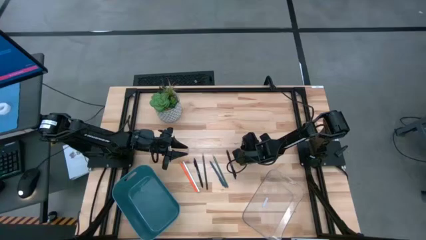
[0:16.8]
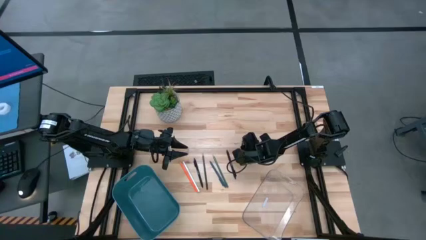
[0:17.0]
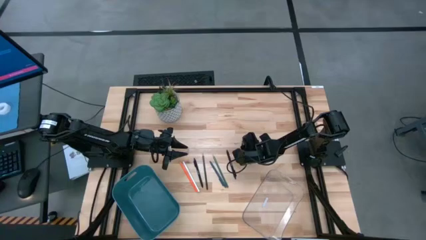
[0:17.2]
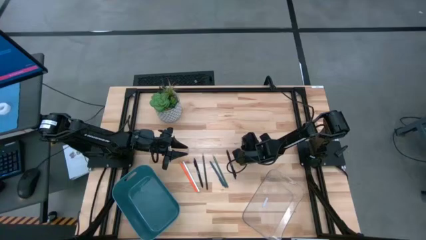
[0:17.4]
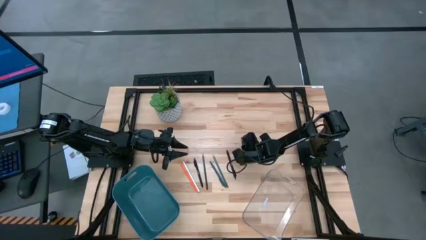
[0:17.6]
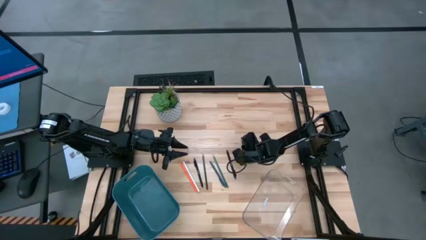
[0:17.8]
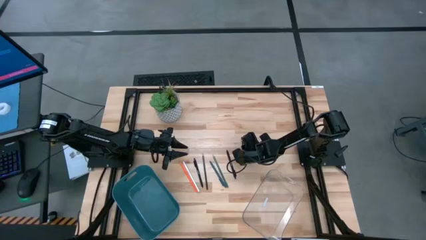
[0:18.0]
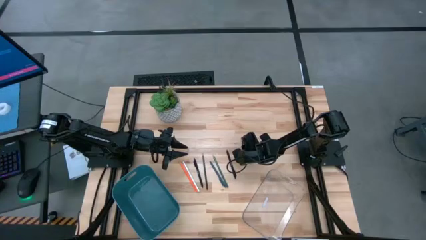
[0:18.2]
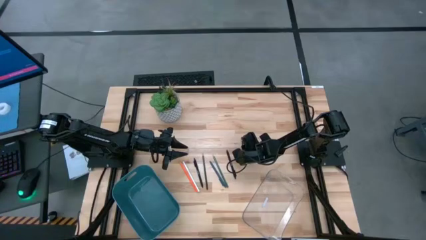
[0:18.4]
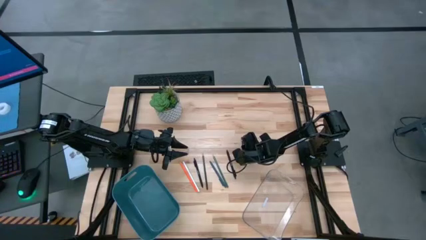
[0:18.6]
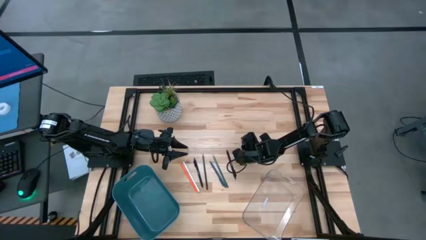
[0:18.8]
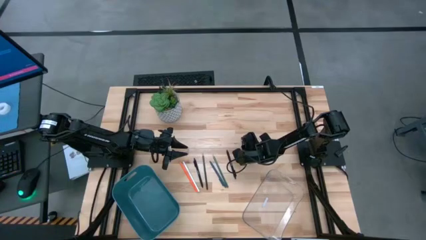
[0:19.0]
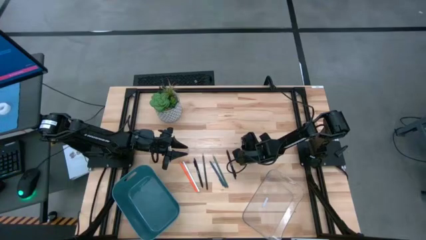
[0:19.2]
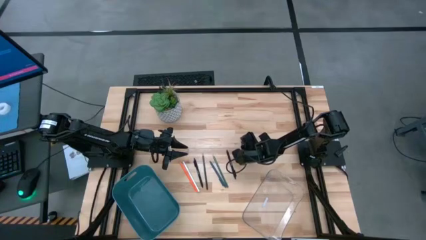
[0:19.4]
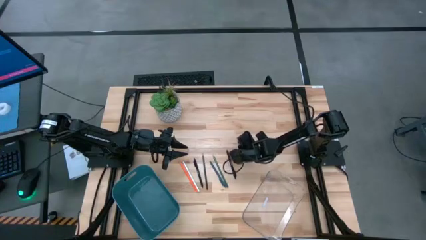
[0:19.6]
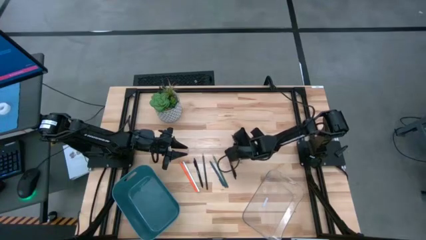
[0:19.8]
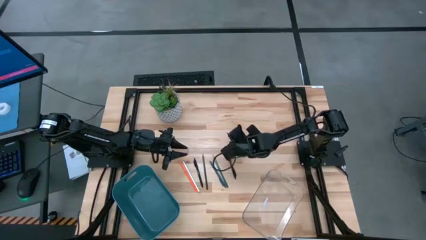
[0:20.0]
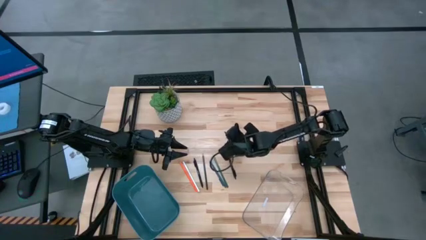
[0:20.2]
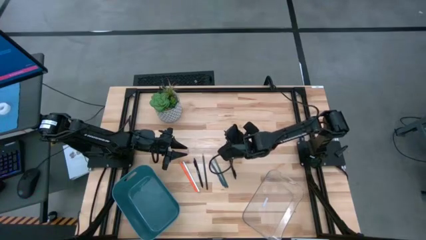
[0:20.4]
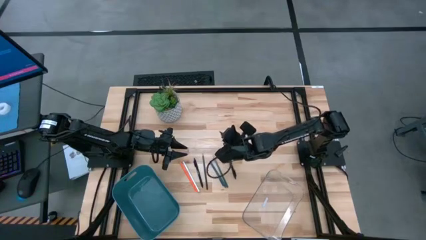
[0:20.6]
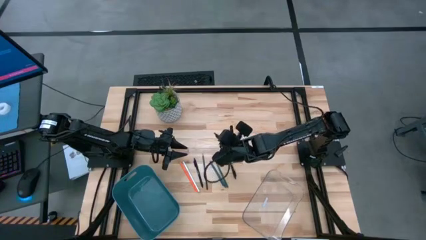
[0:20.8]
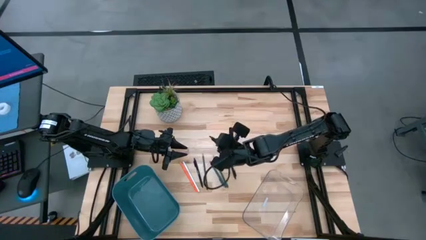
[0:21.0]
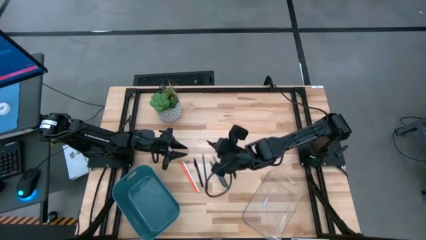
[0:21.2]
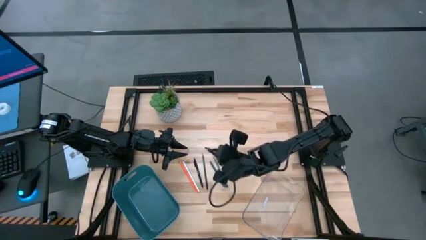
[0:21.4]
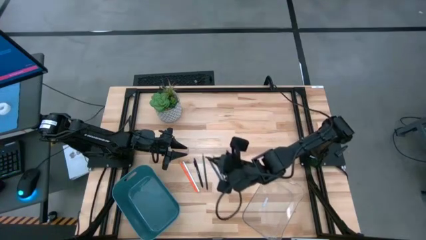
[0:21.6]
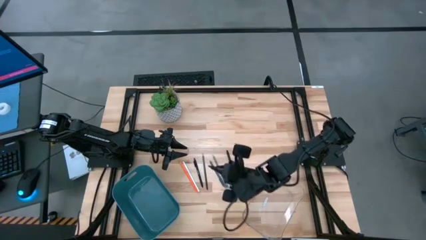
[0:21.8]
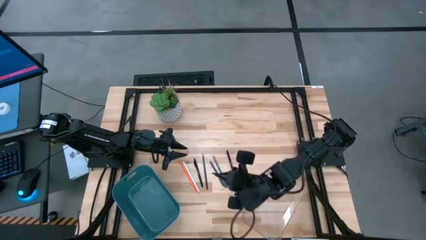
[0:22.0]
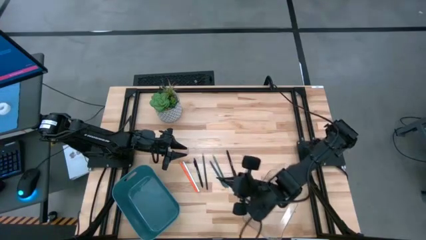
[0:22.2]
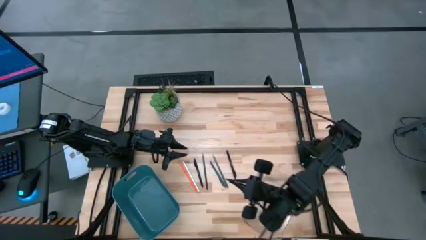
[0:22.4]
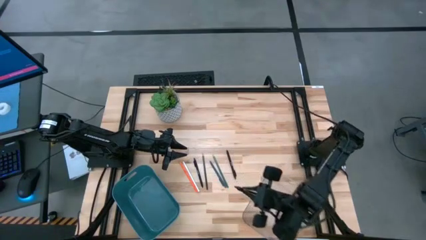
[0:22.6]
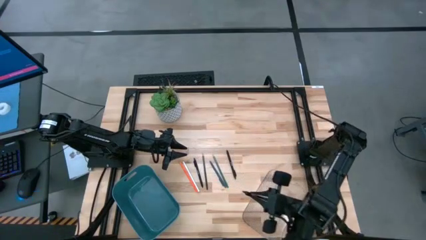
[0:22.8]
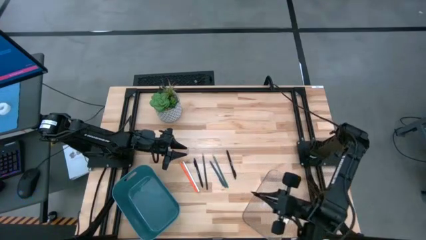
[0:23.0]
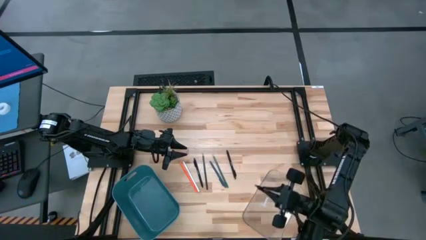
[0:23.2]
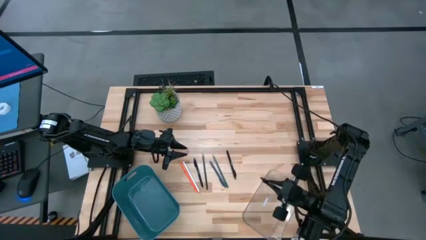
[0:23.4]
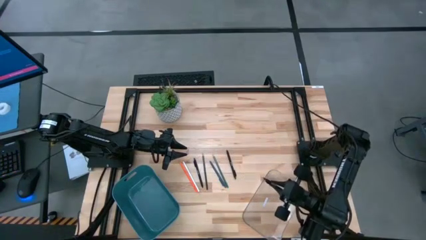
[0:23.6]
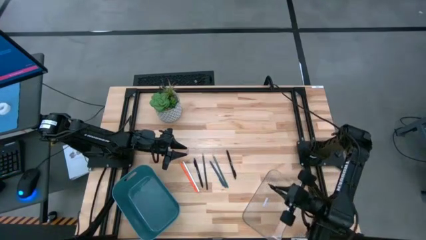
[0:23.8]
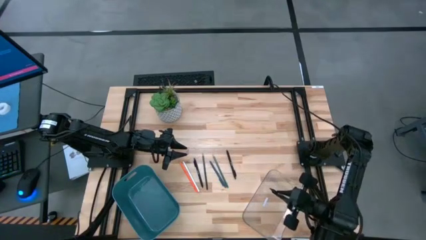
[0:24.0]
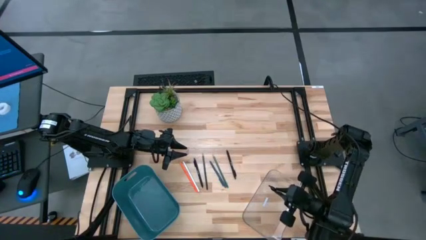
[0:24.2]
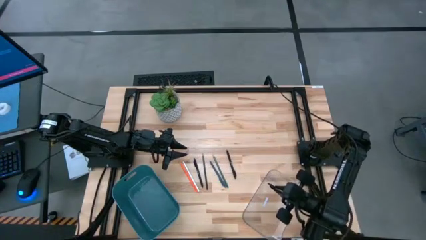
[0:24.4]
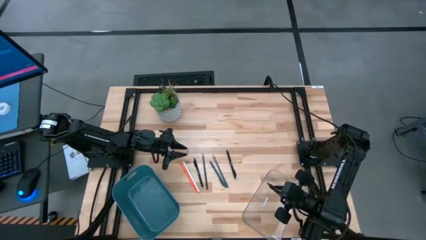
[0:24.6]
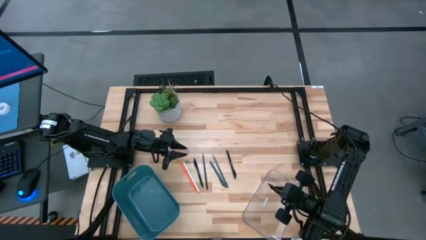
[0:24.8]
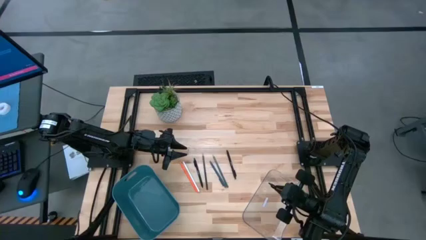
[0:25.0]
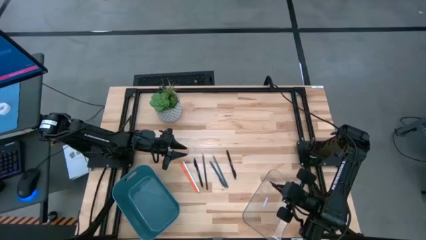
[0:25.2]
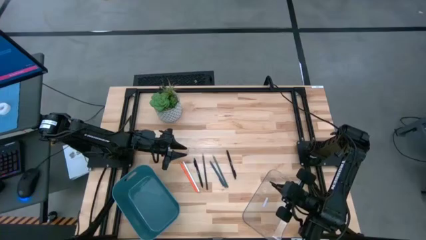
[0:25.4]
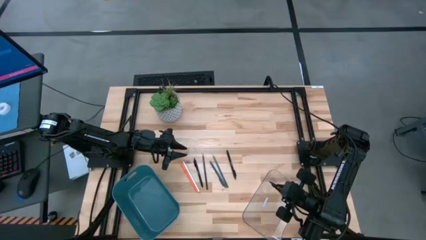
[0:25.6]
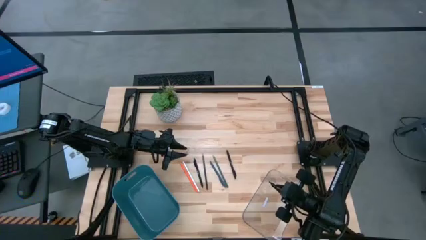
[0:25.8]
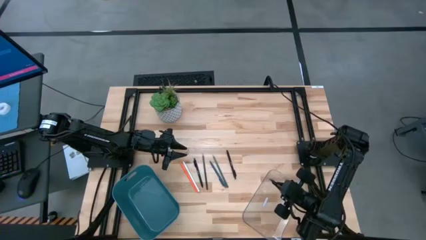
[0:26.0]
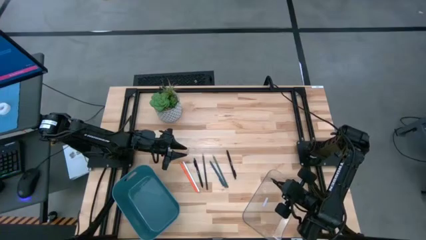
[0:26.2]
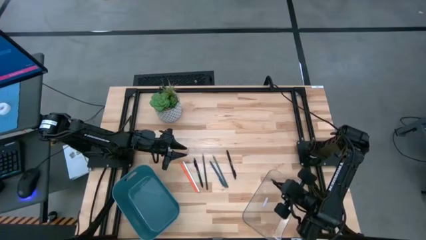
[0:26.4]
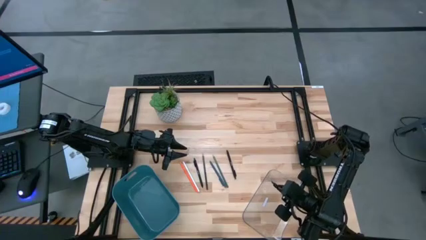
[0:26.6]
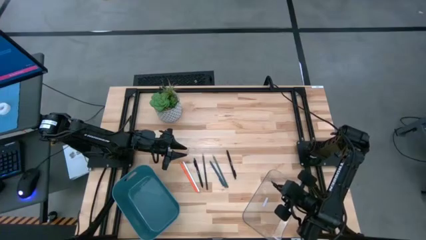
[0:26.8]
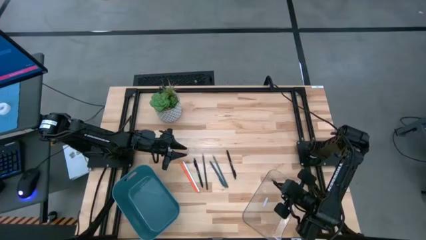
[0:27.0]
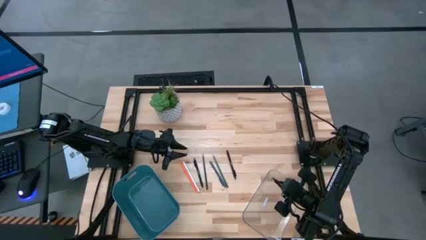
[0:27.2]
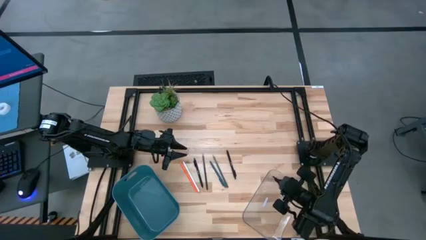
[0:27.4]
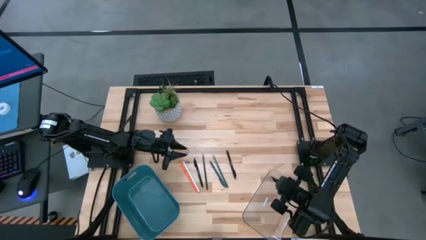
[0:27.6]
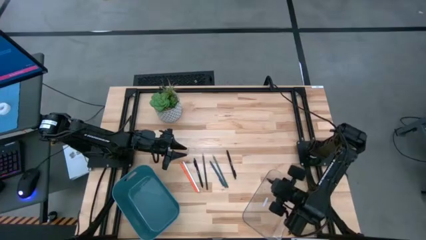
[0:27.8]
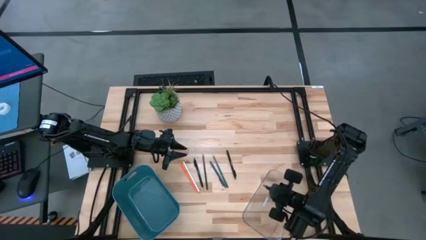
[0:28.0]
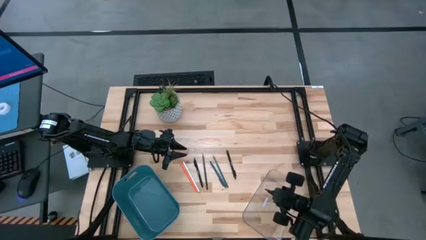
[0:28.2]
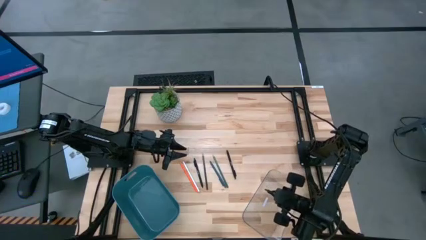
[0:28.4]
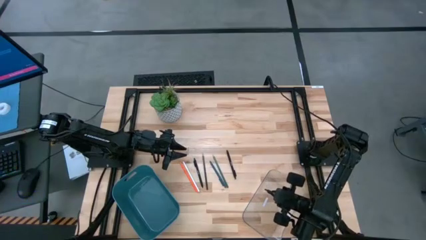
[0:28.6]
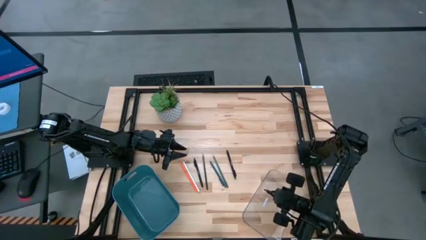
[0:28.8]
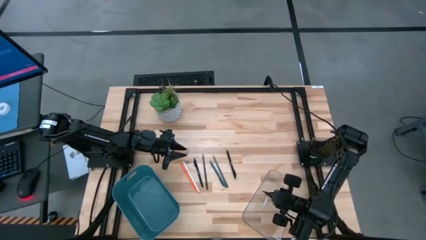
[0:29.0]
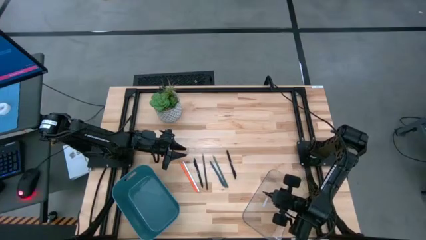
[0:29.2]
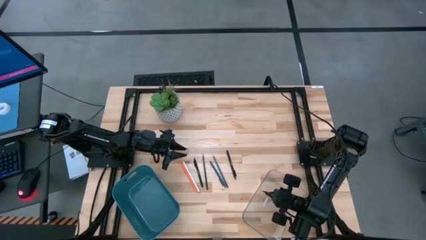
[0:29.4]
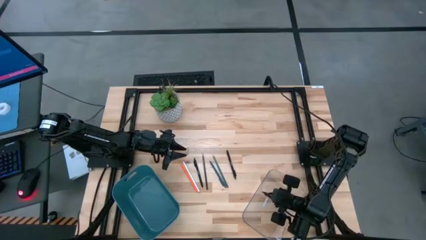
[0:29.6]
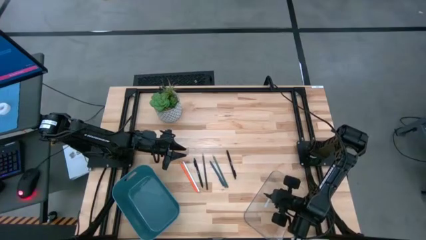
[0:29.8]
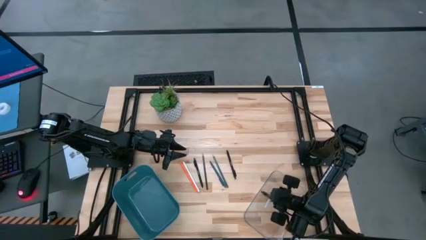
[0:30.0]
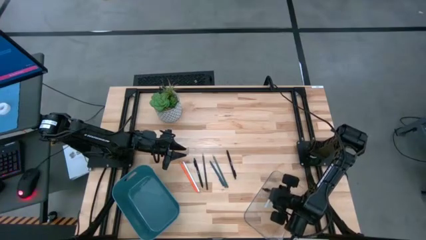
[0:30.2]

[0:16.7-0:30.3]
Task: Sort pens & pencils
Put the transparent black pen into the transparent bin
